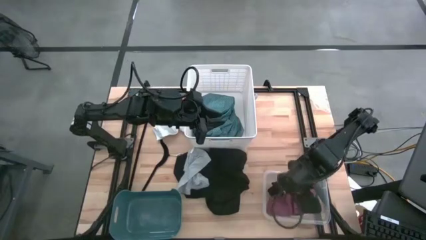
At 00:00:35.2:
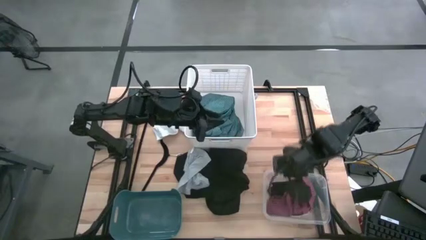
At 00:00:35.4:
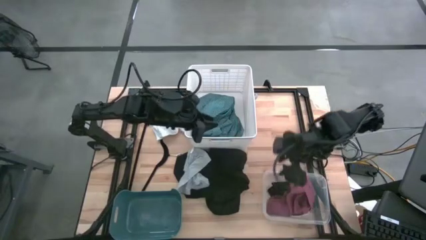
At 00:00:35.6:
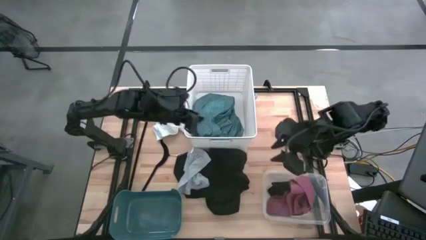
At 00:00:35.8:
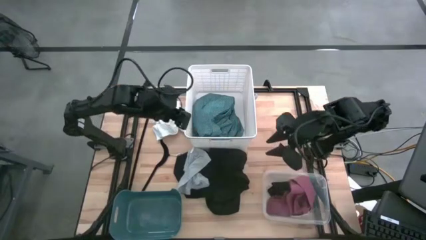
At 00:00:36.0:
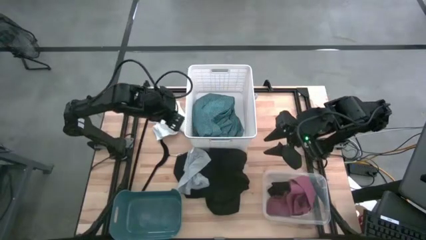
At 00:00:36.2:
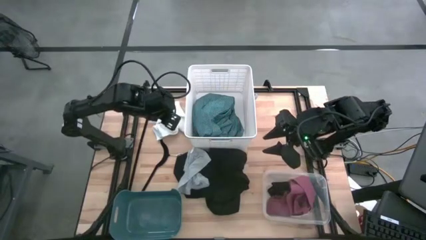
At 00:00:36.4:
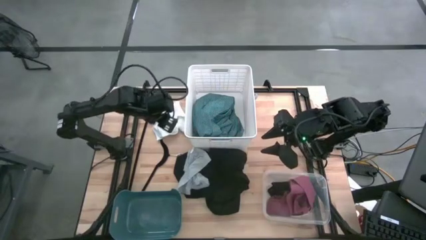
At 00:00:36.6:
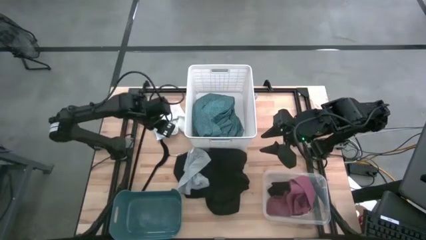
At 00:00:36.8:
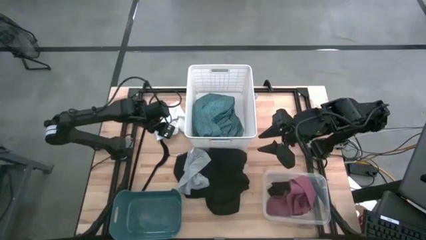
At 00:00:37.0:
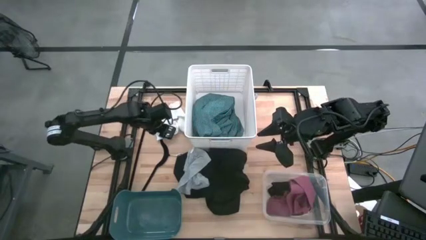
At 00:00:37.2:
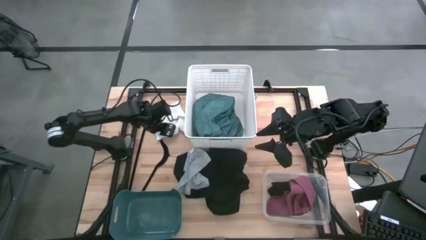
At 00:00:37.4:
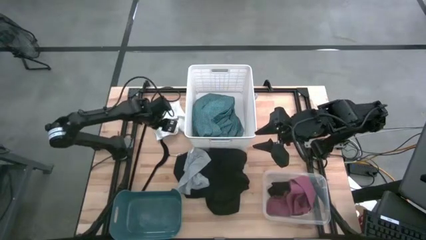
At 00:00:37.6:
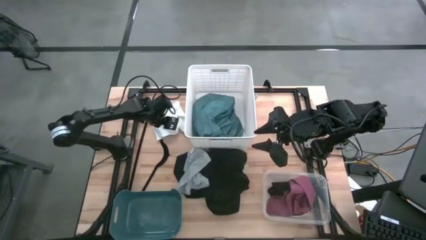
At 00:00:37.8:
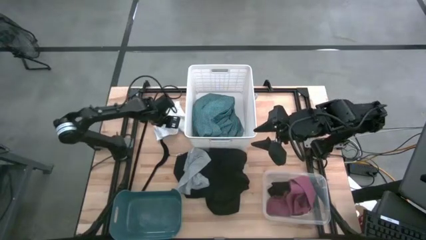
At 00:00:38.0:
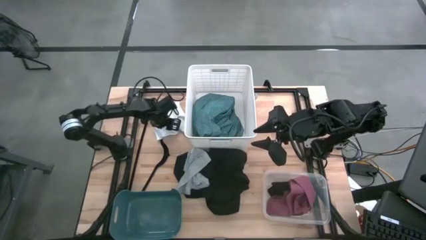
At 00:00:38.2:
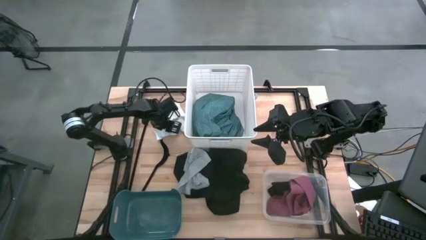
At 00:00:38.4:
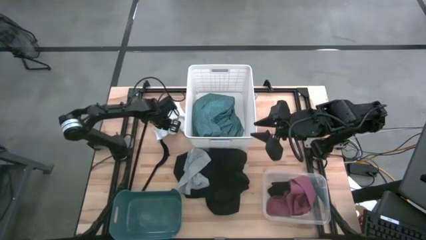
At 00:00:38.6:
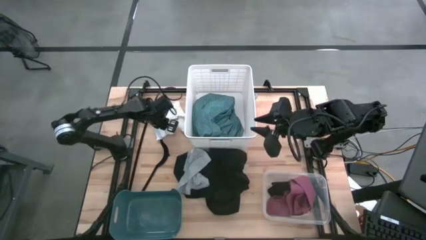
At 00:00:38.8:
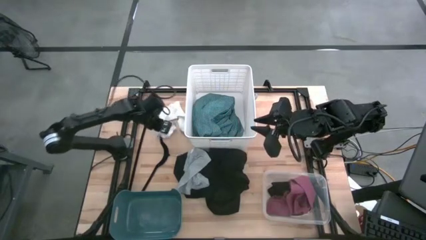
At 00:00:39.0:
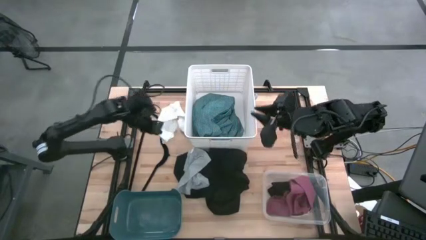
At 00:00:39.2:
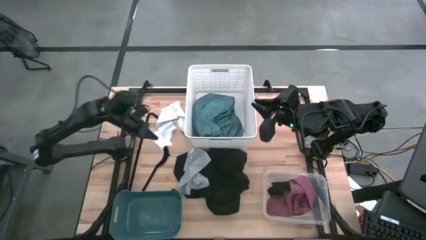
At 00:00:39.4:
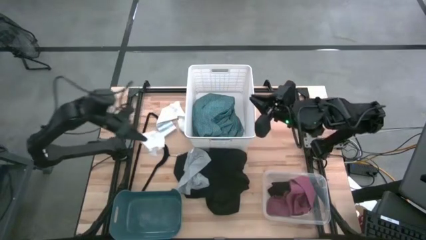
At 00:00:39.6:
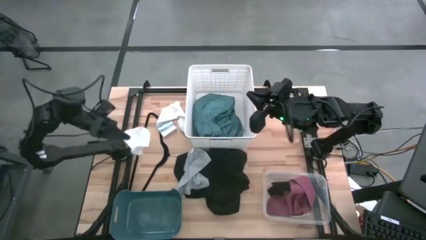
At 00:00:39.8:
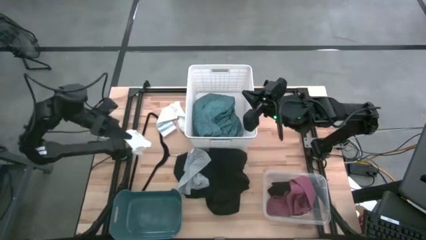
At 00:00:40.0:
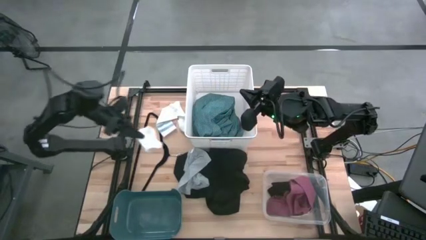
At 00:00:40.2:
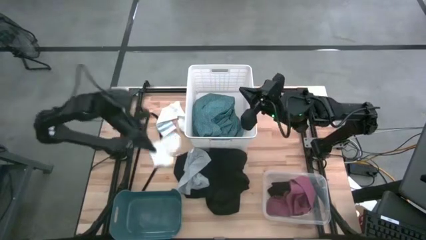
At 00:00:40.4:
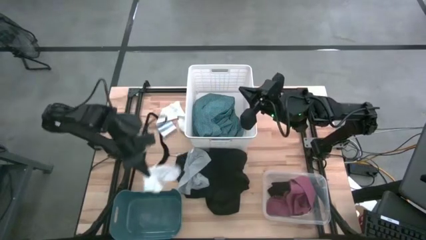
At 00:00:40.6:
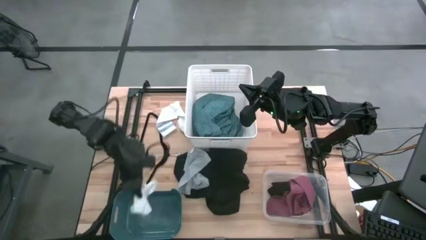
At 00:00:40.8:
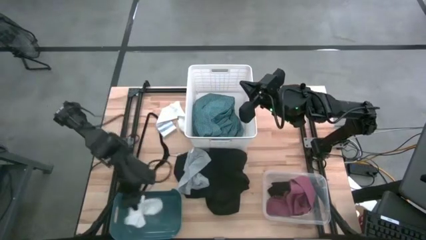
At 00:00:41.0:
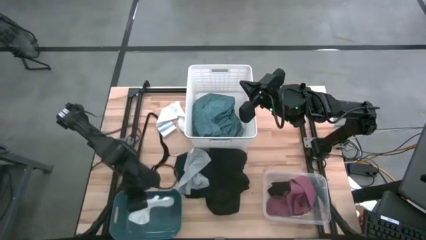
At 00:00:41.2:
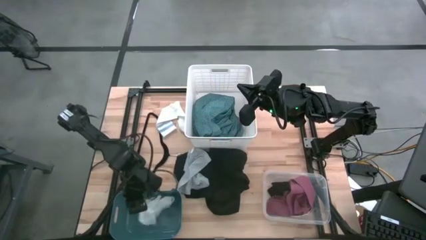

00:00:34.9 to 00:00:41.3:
Task: Pick & Place Cloths
Put the white sock into the dark blue bin

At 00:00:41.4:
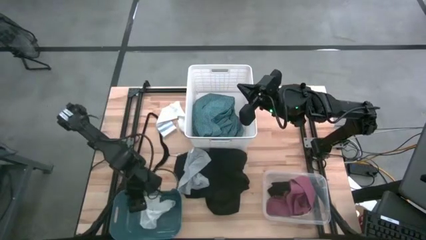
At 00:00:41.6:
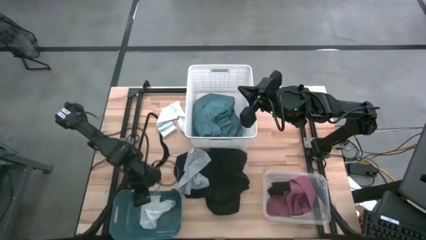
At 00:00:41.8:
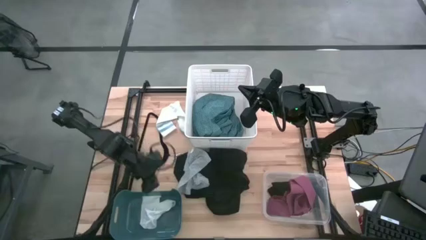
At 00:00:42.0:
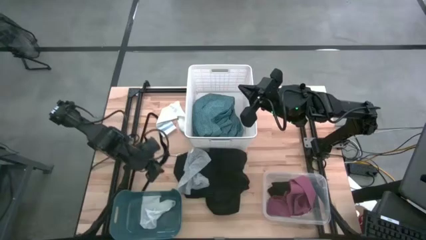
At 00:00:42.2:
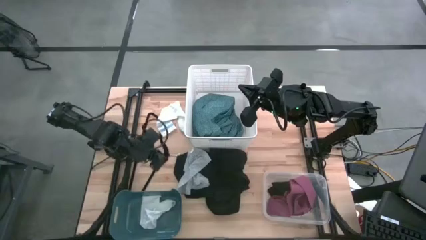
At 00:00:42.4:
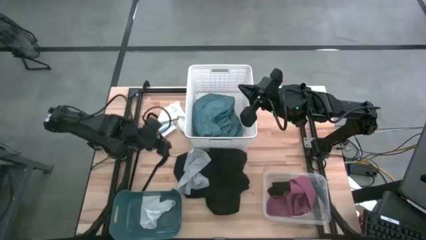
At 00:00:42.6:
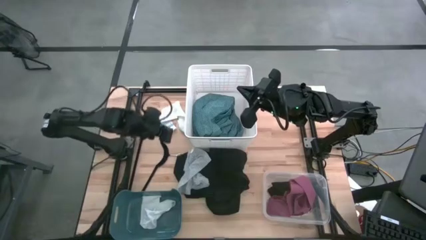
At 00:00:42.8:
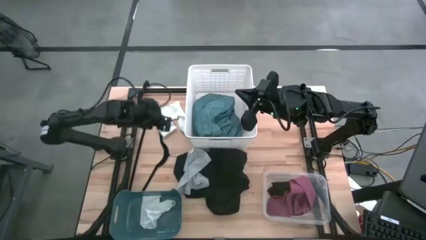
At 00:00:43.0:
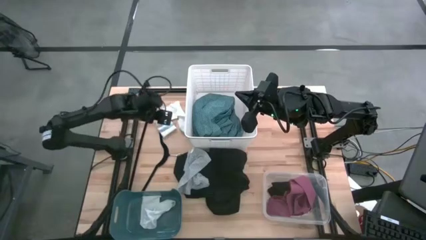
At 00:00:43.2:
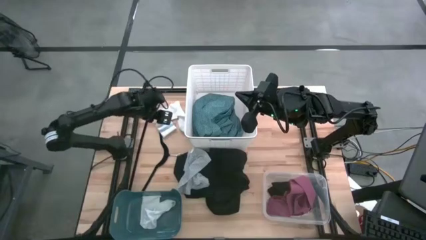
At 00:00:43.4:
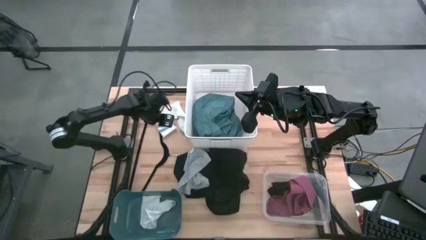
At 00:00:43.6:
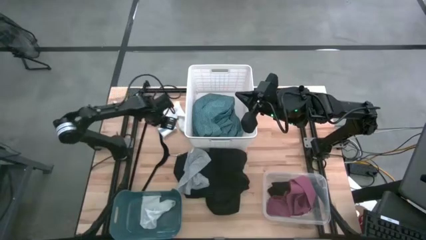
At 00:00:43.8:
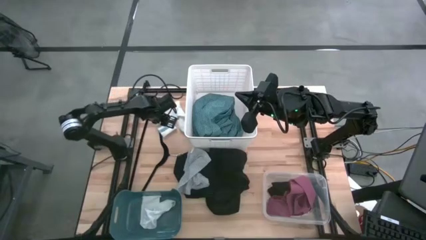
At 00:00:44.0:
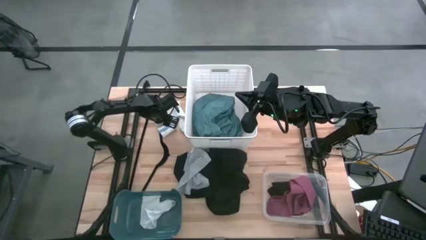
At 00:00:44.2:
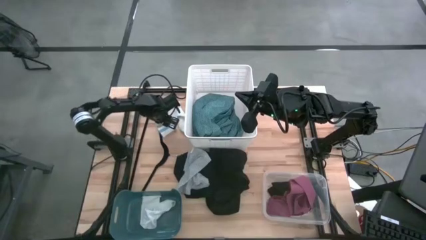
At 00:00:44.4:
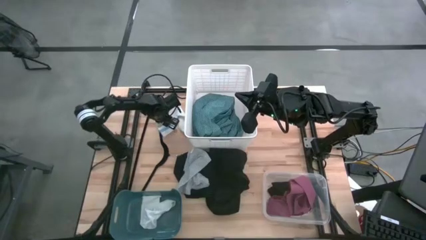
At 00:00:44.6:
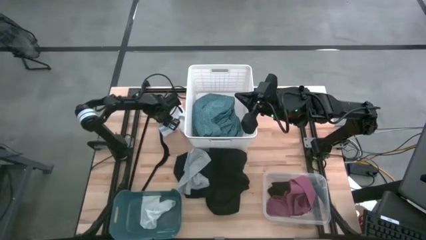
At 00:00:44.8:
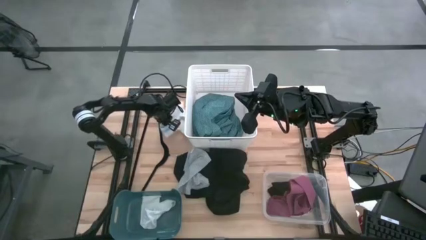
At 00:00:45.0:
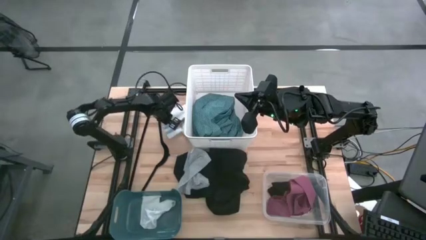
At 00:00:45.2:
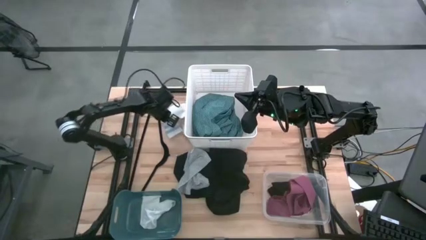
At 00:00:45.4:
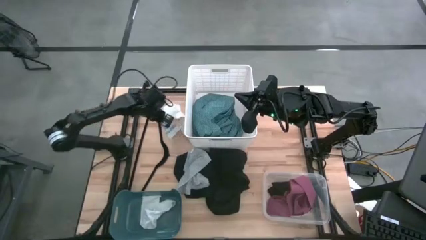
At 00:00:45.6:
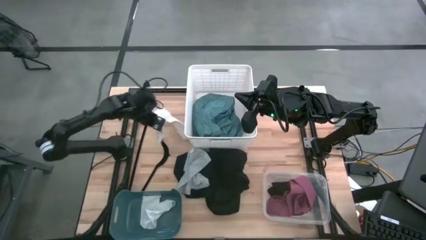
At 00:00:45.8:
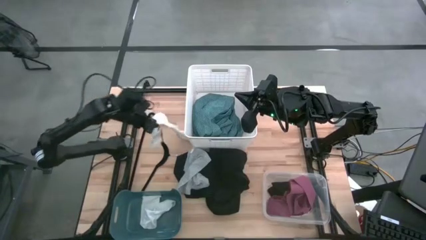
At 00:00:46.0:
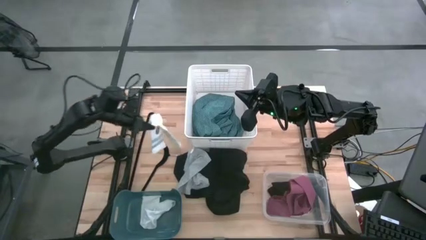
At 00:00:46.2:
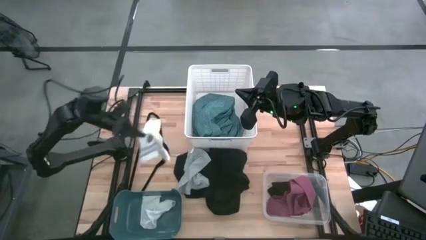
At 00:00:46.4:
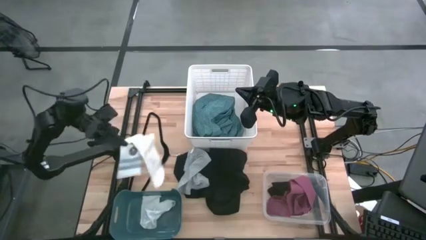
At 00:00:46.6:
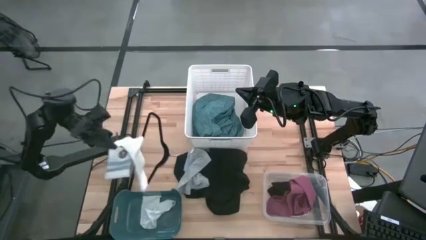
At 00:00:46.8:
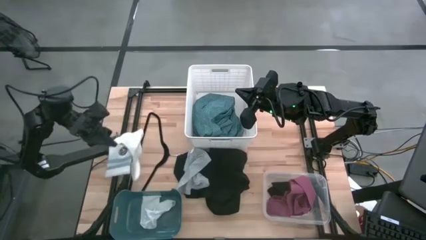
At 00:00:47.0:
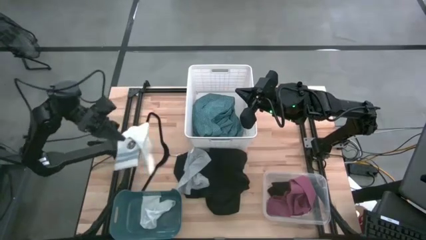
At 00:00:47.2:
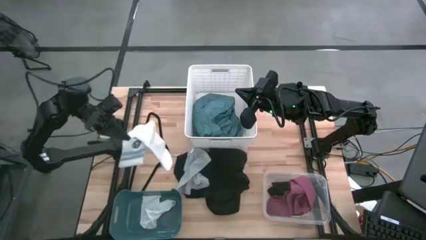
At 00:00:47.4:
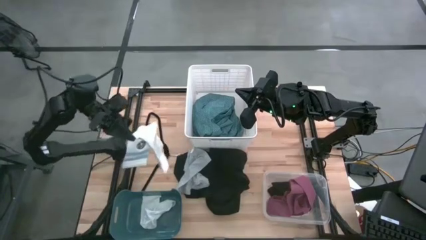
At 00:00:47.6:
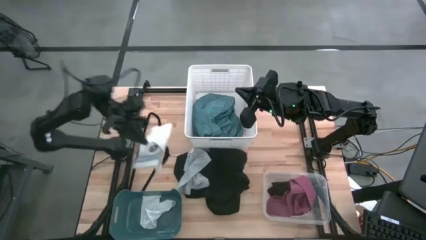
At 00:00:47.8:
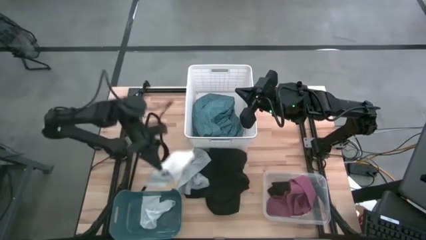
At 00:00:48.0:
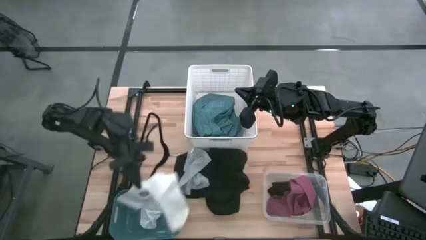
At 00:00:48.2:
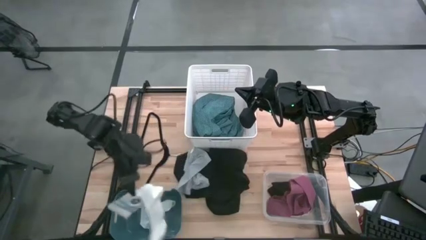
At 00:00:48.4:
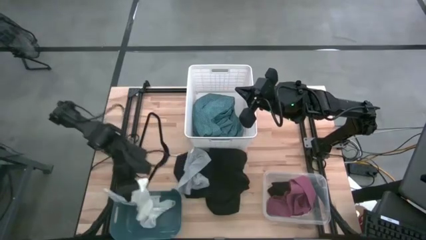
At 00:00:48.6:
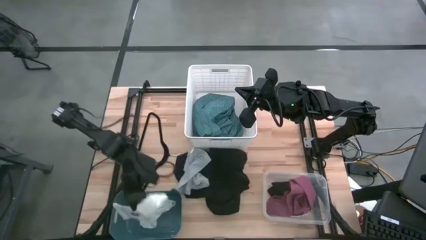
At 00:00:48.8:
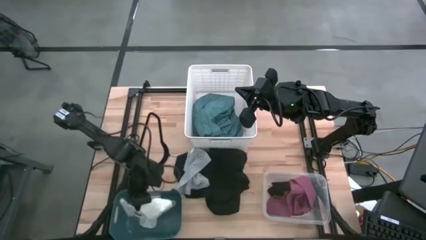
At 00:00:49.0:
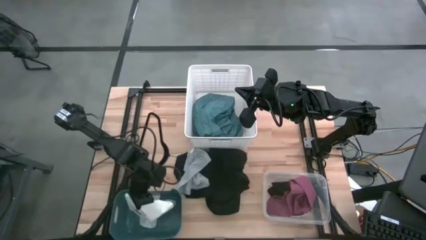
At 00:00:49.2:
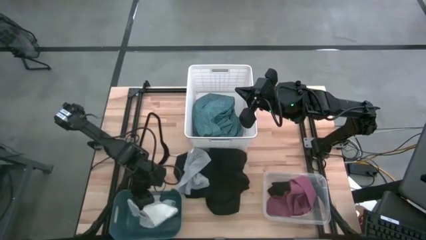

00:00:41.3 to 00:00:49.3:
Put the white sock into the dark blue bin
